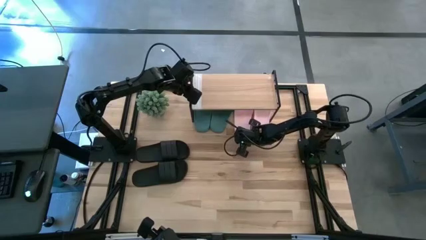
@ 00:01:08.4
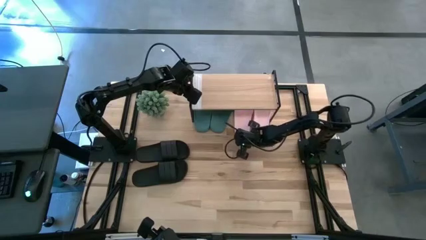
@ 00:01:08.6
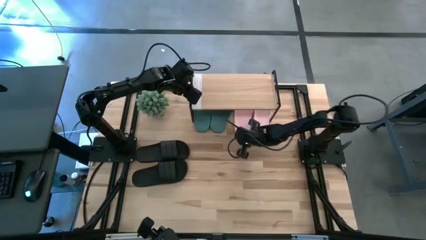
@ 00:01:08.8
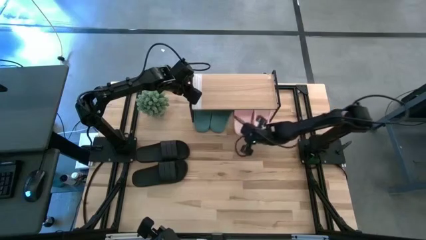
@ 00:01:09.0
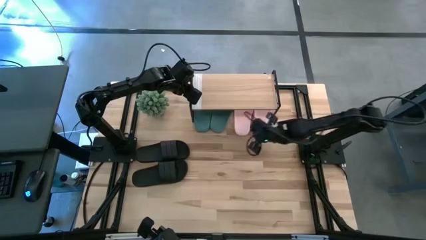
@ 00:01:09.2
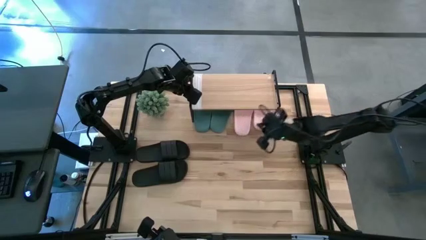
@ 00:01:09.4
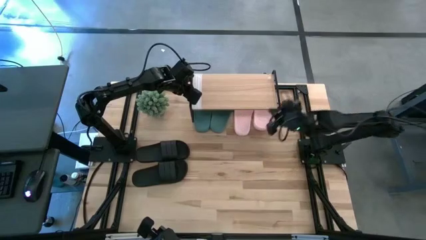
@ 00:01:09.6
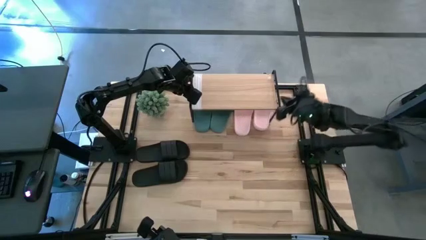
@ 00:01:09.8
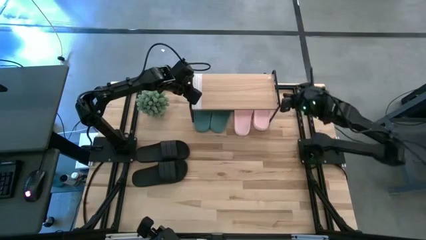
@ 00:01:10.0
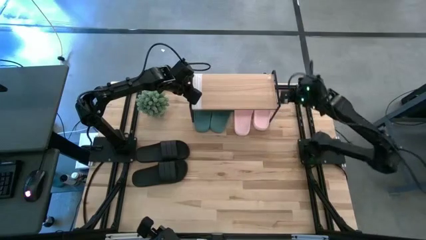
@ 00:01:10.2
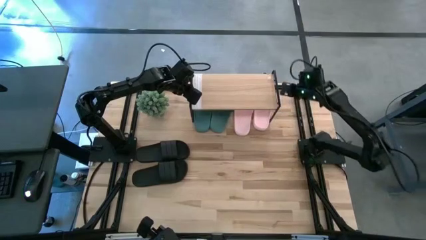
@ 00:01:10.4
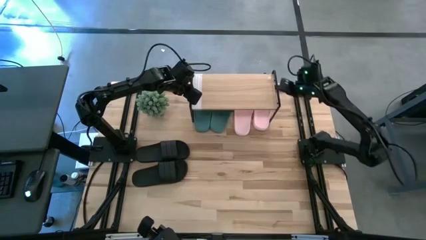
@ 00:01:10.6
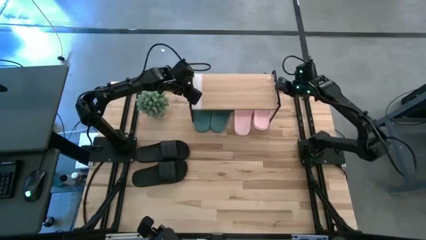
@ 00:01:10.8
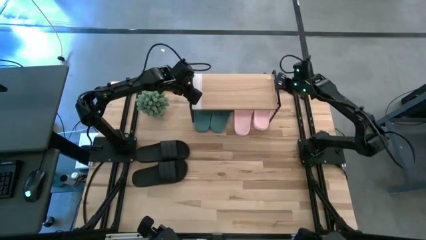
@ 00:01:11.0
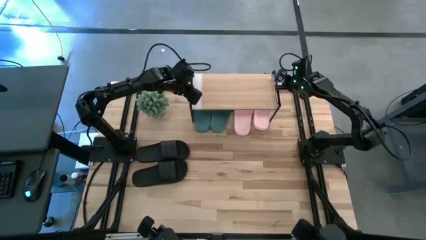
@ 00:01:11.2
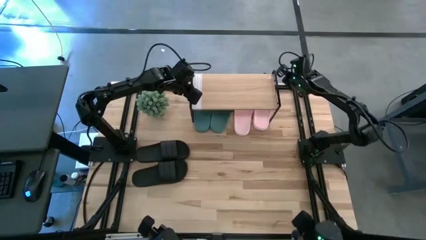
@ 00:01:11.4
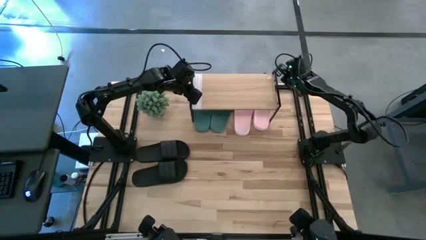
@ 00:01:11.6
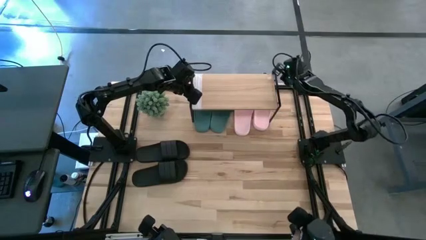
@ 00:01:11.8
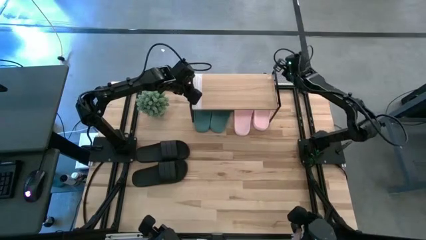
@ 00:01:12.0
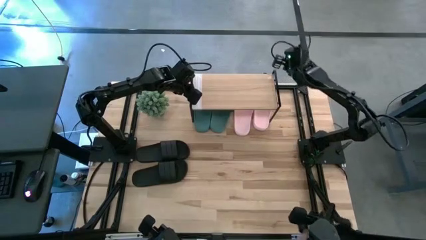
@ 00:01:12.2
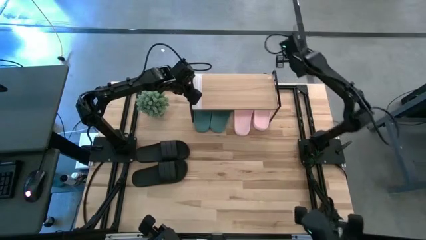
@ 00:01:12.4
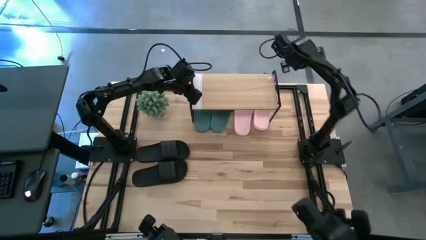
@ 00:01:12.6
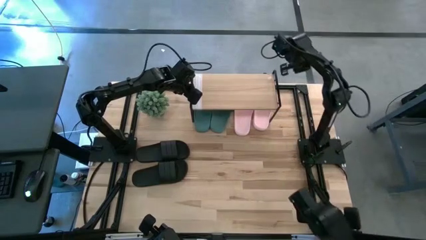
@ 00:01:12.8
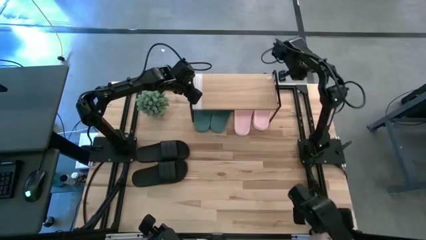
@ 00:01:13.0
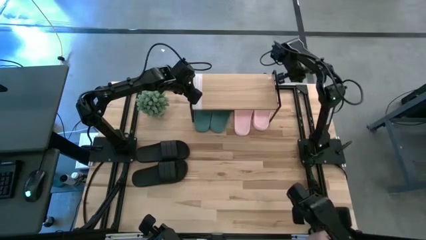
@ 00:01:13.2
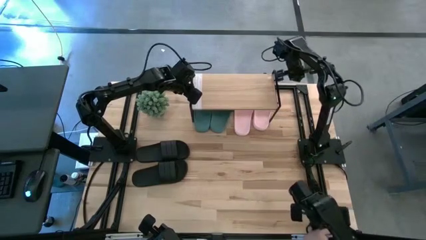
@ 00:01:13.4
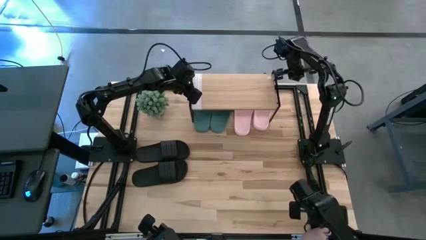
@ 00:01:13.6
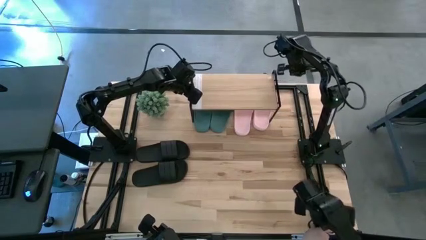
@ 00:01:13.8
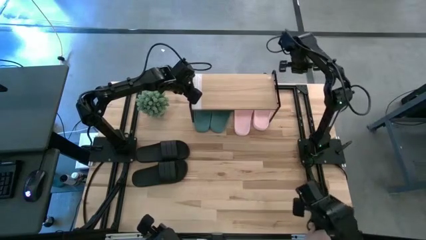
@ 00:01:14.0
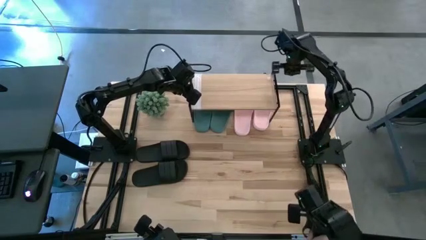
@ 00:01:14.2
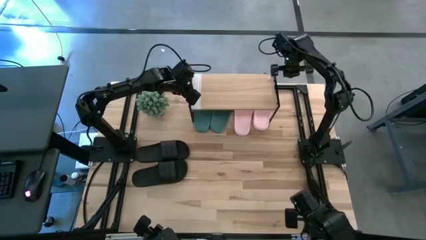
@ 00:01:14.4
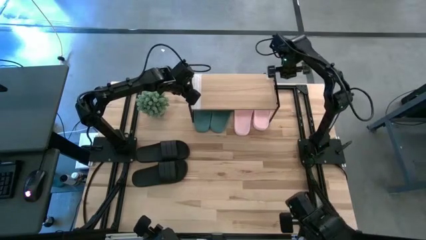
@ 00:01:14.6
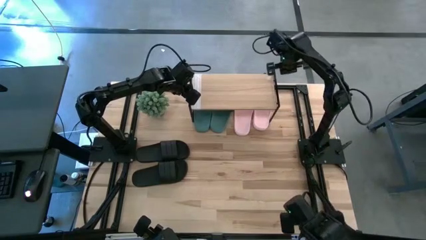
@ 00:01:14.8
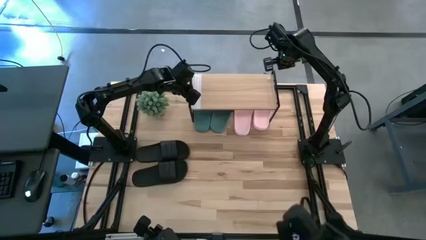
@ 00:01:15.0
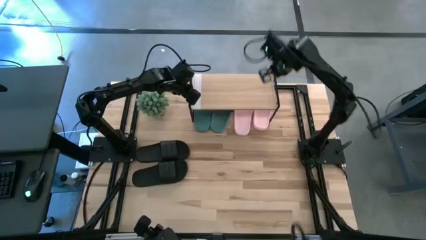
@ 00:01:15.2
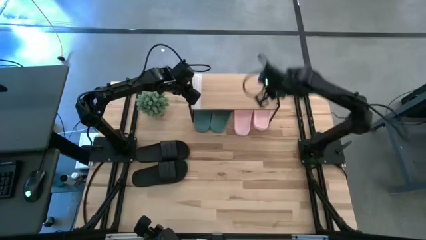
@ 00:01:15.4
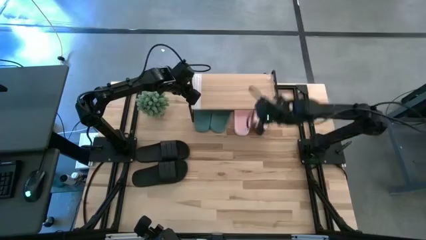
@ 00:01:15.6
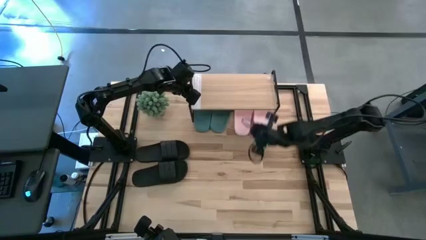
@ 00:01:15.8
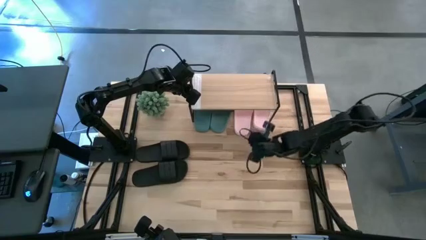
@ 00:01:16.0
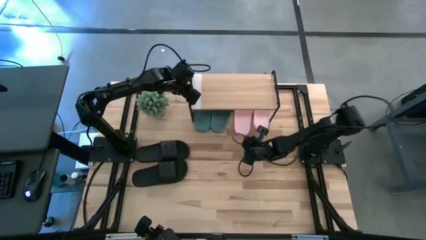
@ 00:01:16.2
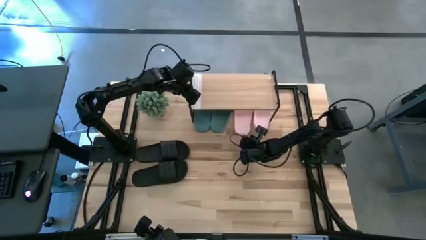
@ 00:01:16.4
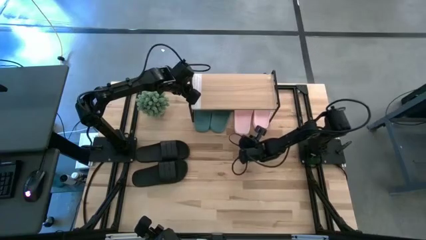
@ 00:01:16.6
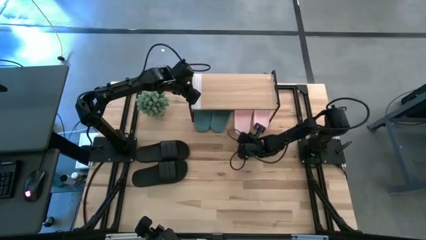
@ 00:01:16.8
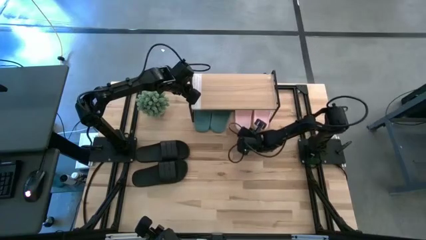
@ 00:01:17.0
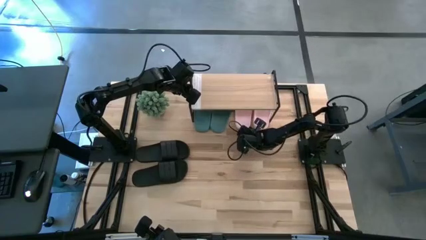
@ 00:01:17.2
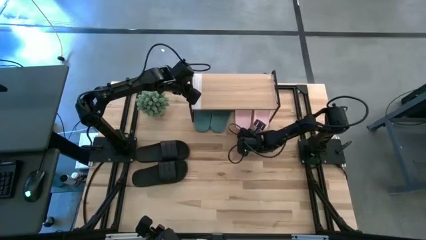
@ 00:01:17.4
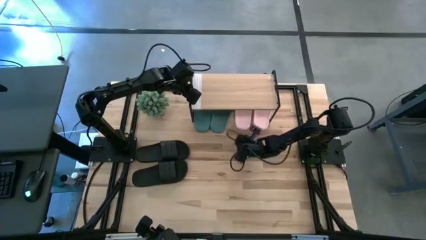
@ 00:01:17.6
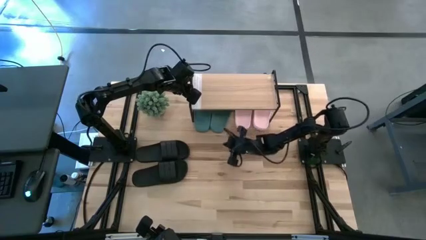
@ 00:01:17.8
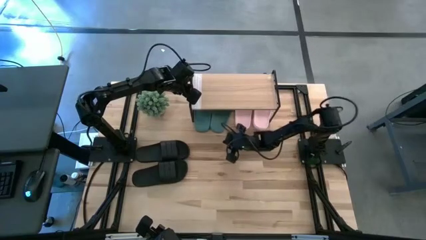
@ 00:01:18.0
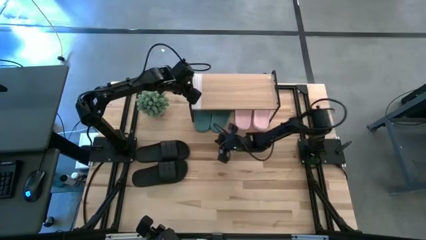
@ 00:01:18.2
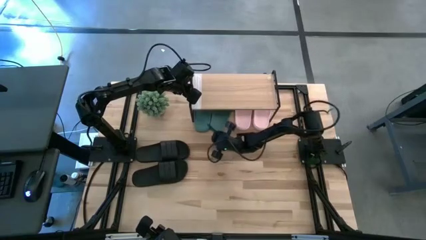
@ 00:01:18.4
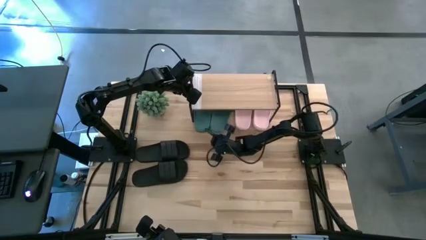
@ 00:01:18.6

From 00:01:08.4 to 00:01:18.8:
Task: Pick and place slides into the shelf
Adjust the slides under the shelf
